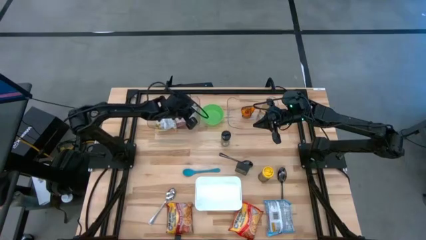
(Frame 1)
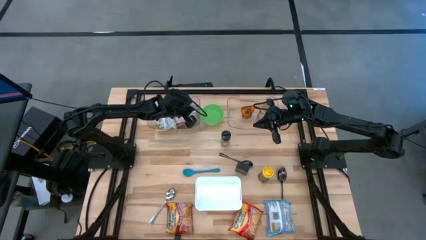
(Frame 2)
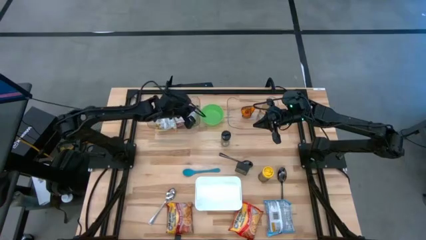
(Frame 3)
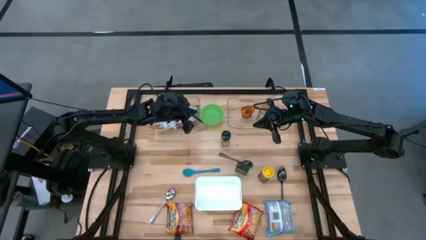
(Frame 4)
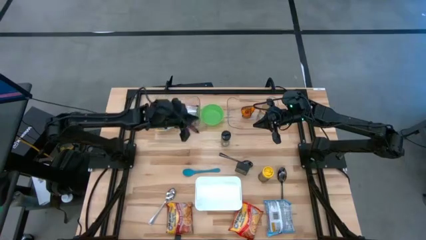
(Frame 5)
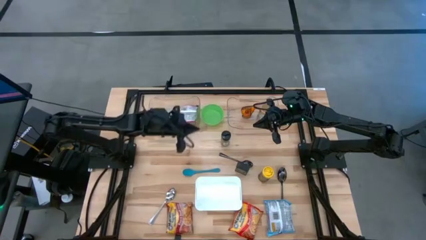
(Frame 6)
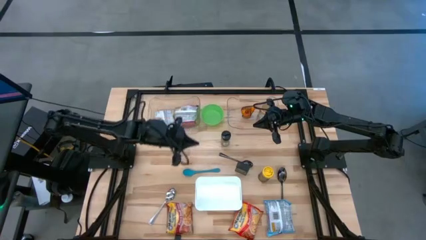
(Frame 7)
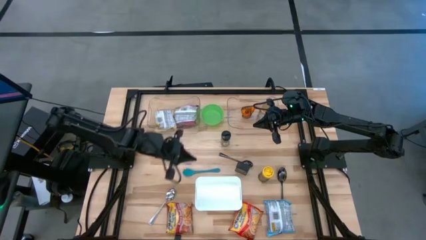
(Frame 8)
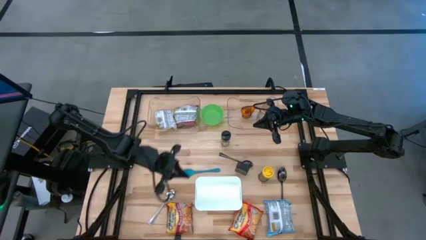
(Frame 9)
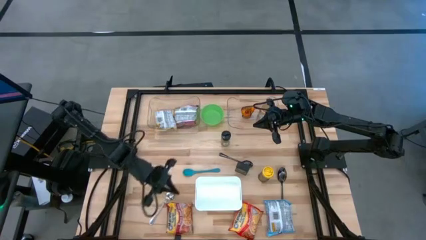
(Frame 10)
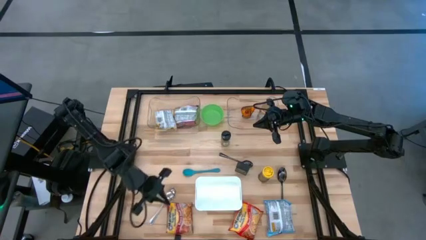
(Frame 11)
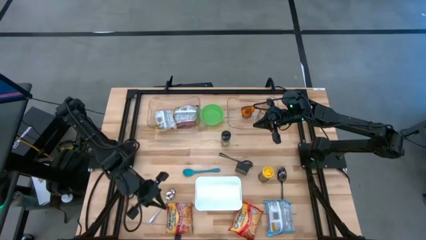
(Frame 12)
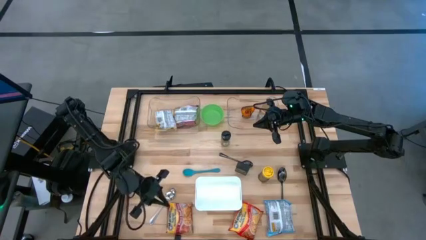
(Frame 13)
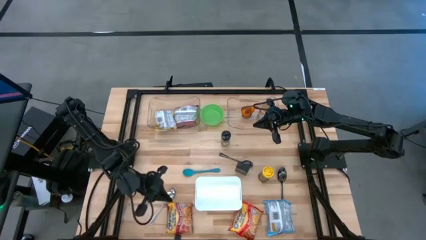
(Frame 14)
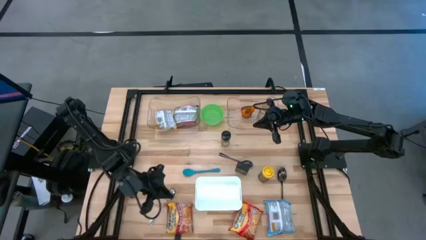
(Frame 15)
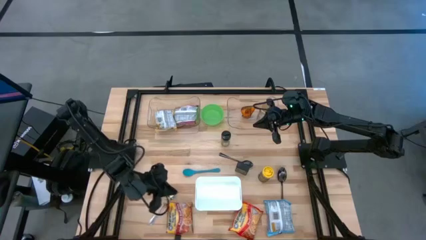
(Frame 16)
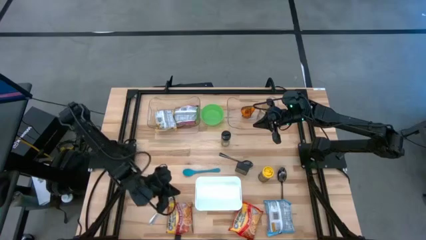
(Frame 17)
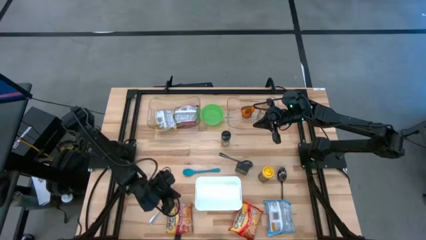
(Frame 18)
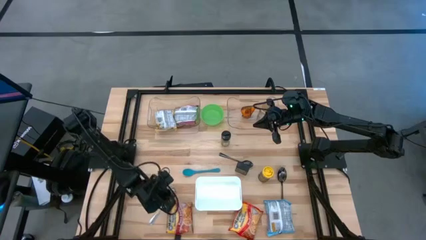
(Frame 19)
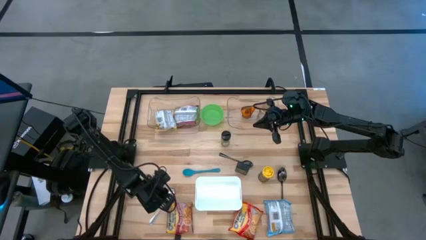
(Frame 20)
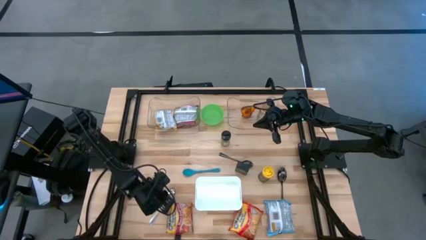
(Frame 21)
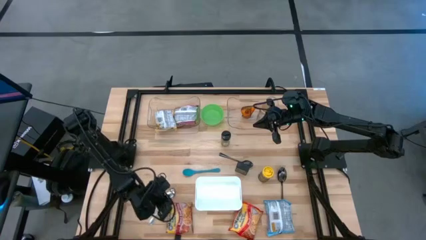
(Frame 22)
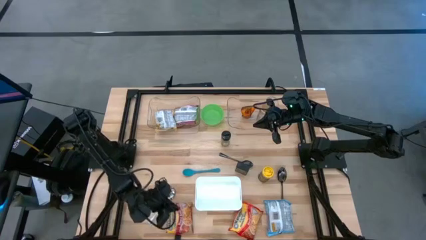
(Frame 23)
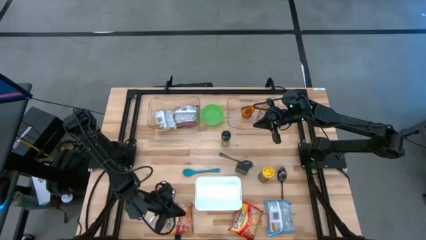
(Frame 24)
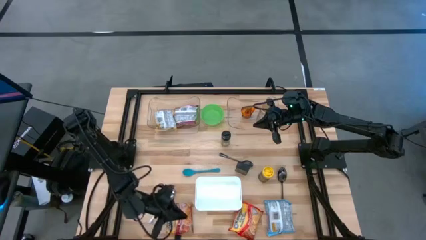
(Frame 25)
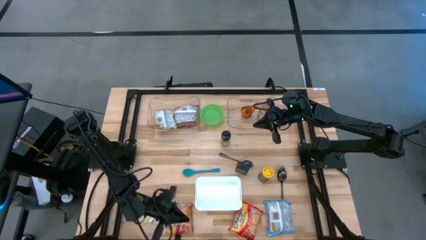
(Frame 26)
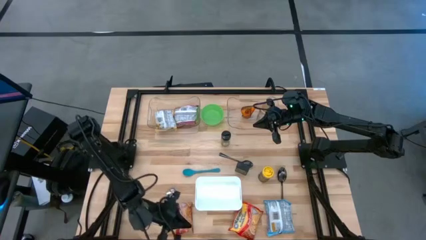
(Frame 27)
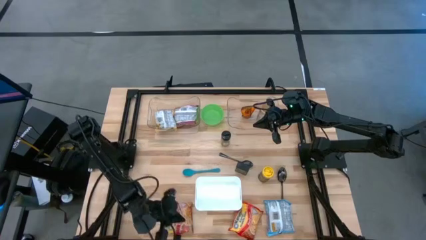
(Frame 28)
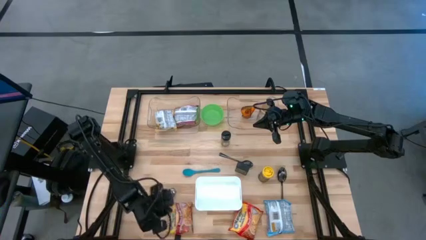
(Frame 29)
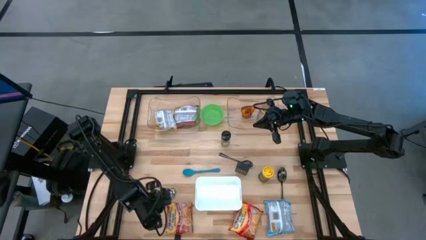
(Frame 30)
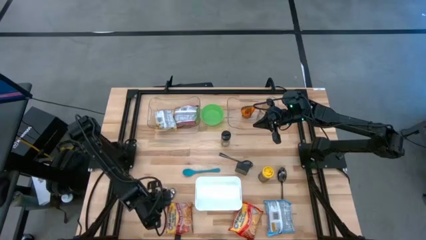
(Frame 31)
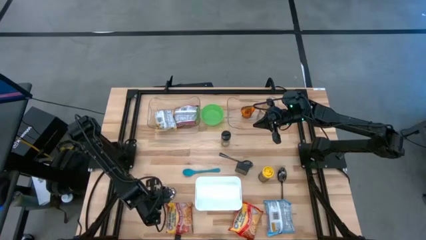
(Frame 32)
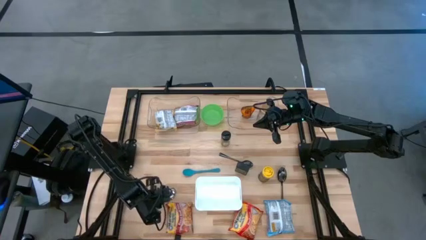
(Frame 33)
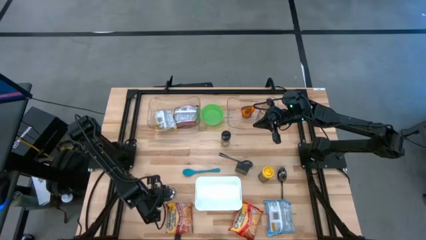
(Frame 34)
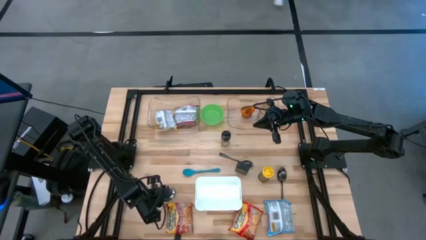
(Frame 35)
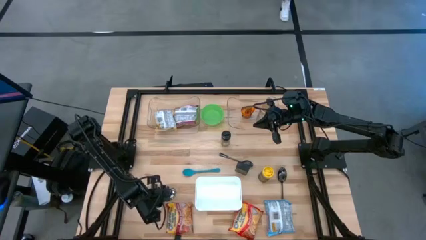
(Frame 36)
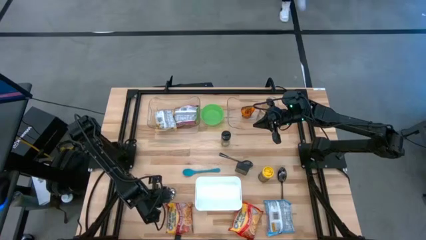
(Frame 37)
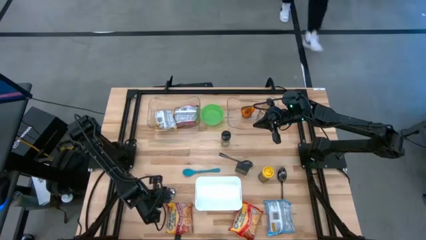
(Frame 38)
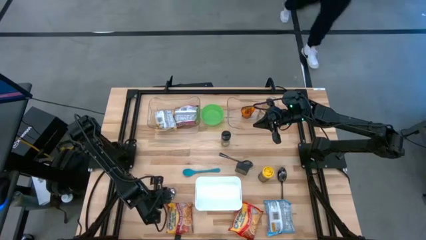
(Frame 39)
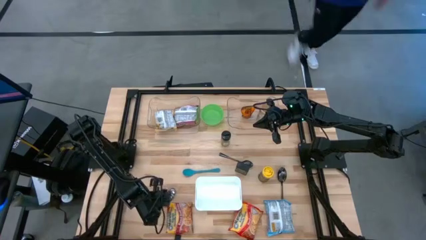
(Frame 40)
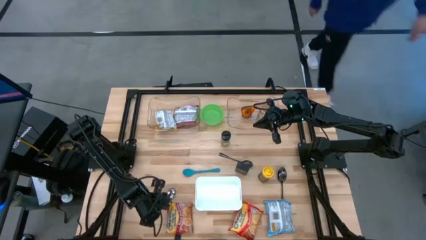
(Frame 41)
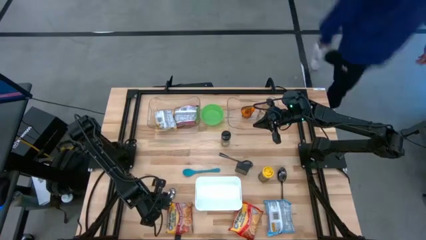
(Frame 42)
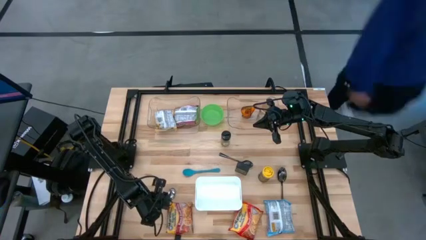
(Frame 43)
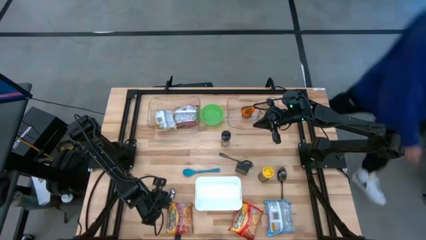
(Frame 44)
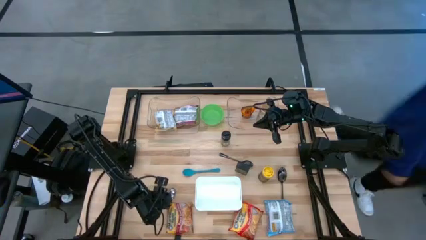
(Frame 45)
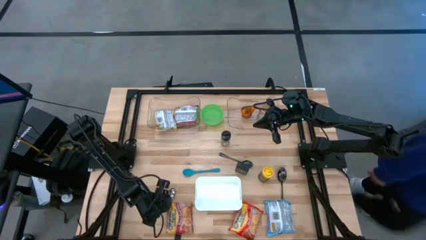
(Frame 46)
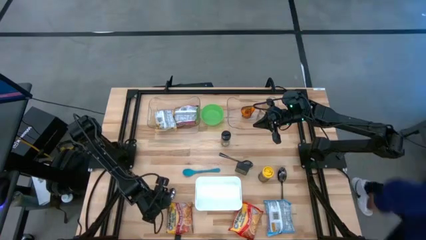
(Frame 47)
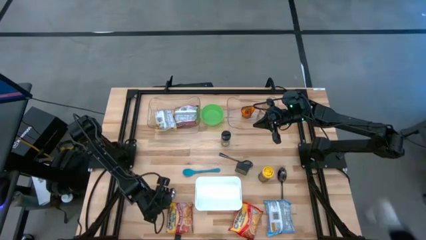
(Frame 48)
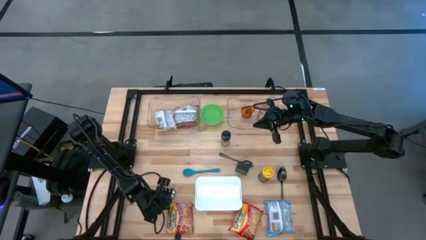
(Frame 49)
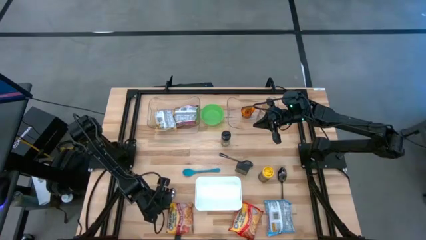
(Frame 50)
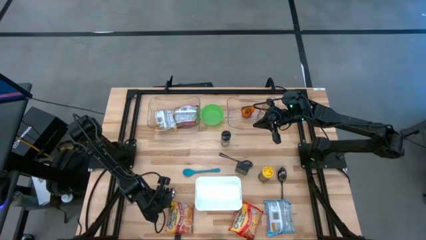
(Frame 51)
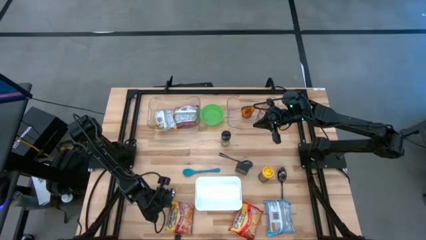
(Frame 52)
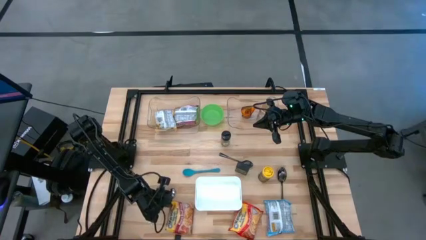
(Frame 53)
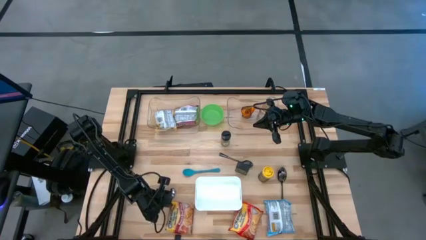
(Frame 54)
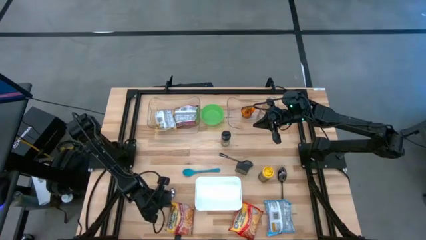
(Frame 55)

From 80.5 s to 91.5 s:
Task: Pick & Place Food Item
Put the red noodle pack into the left transparent bin
